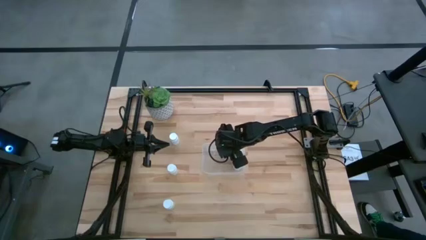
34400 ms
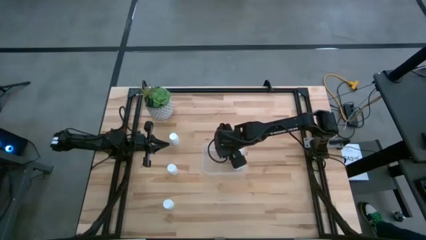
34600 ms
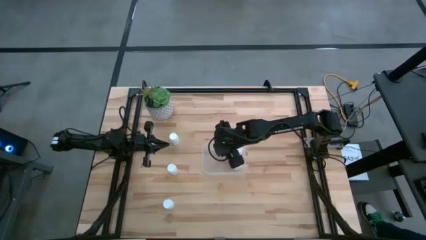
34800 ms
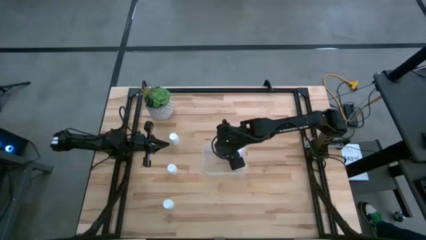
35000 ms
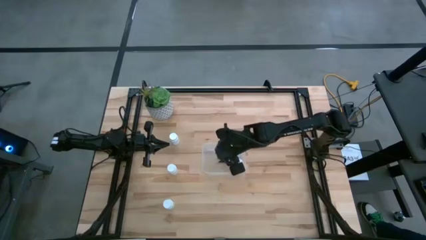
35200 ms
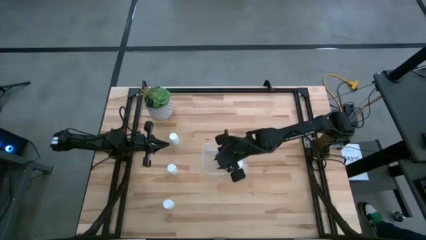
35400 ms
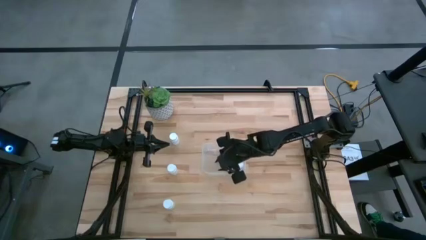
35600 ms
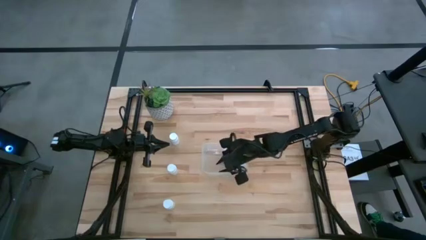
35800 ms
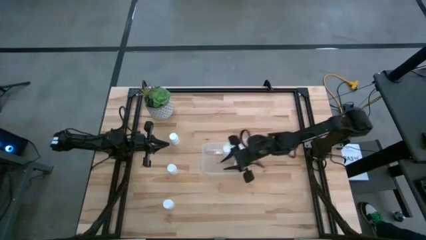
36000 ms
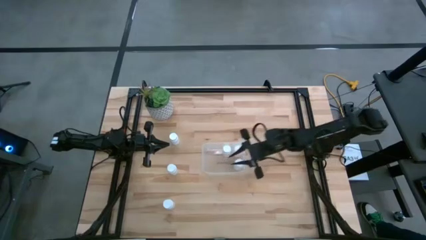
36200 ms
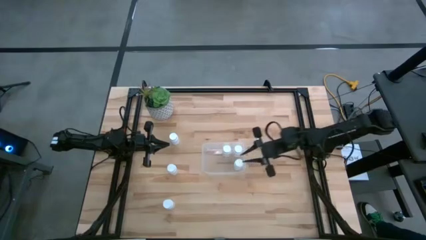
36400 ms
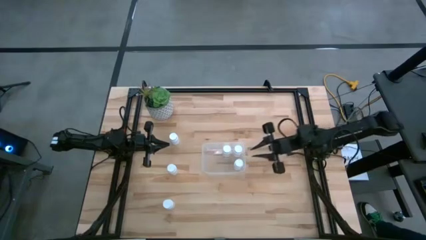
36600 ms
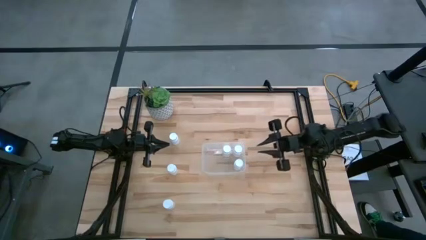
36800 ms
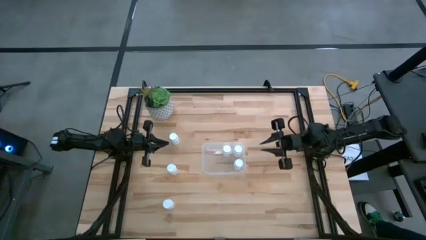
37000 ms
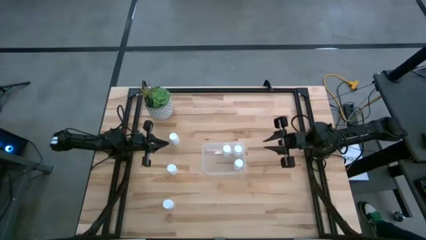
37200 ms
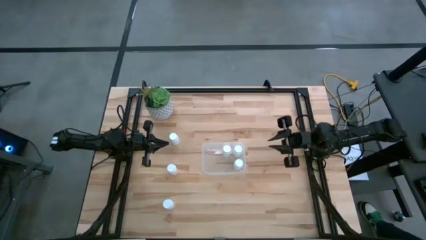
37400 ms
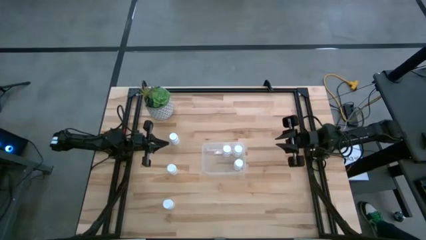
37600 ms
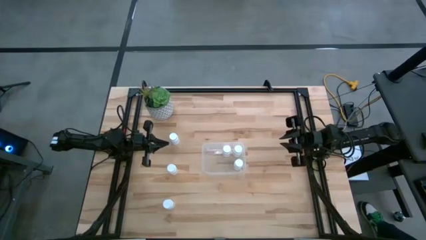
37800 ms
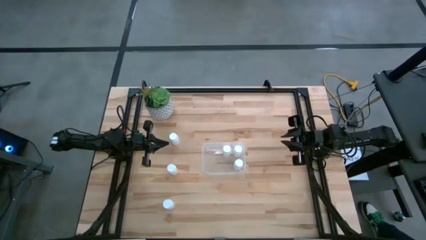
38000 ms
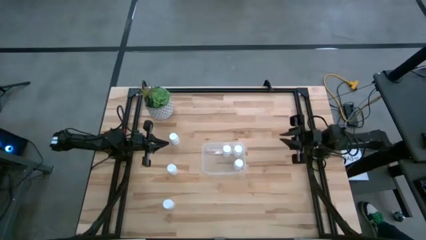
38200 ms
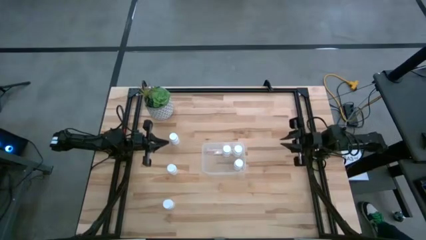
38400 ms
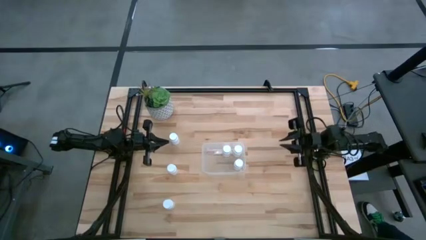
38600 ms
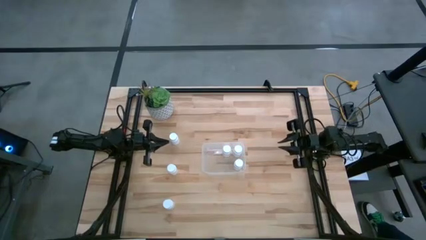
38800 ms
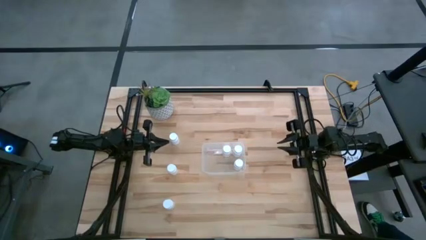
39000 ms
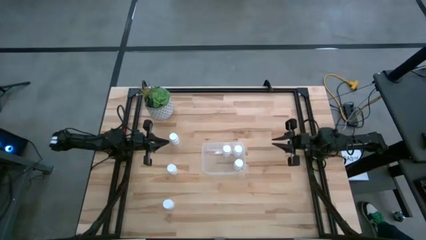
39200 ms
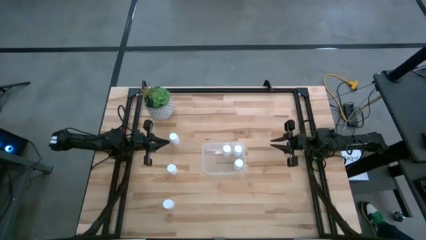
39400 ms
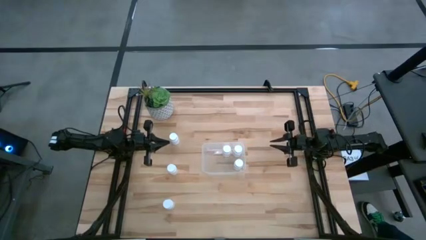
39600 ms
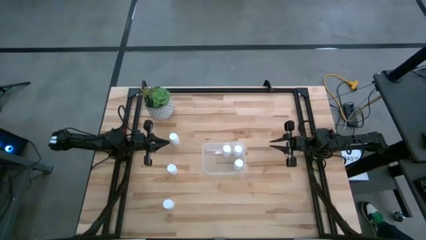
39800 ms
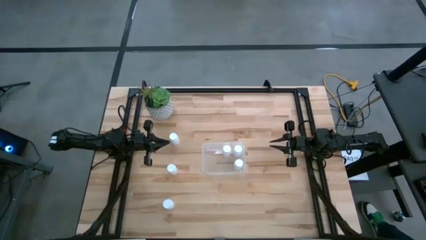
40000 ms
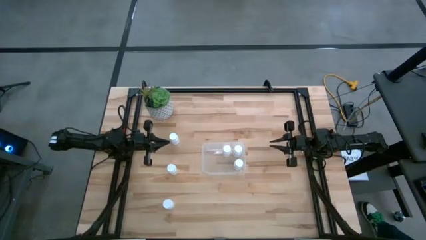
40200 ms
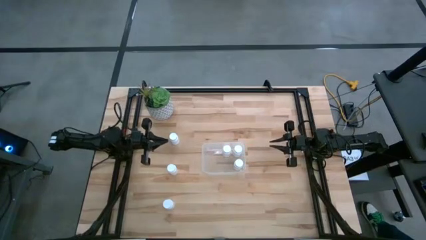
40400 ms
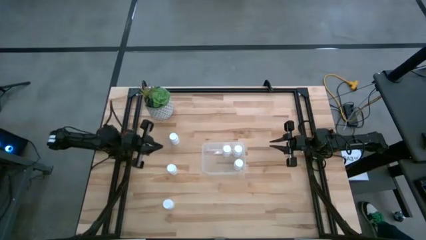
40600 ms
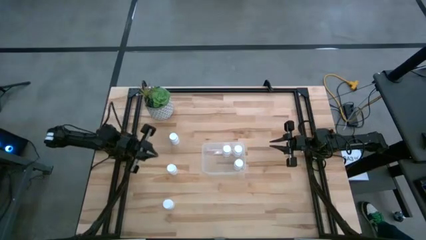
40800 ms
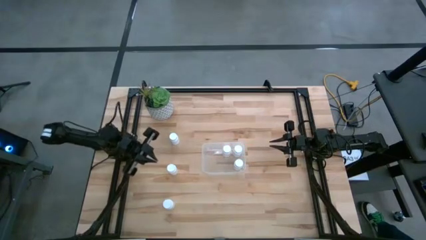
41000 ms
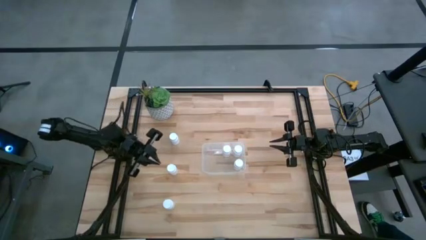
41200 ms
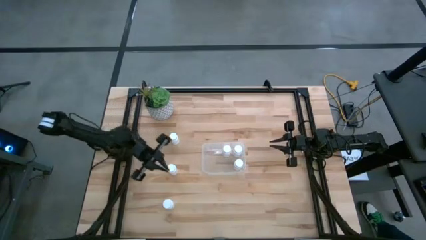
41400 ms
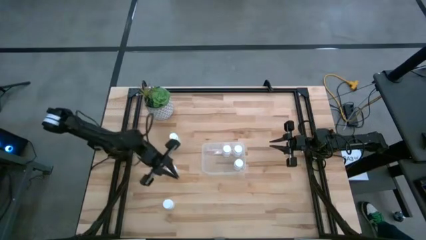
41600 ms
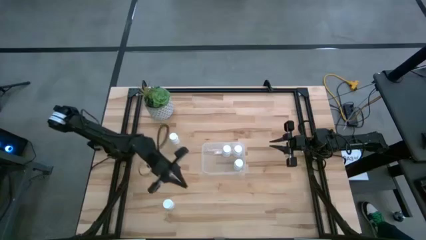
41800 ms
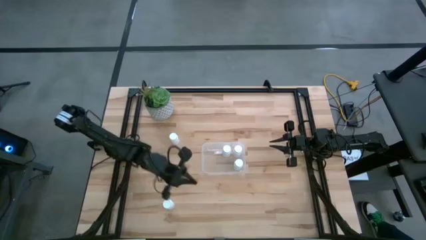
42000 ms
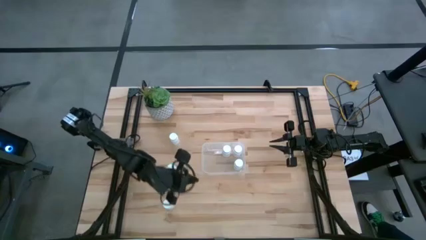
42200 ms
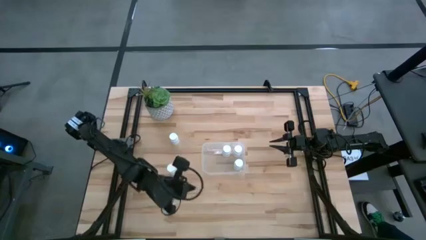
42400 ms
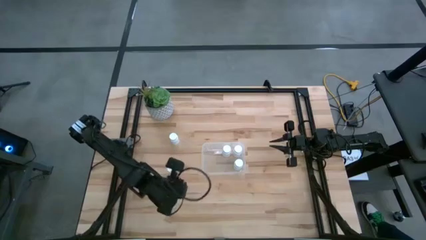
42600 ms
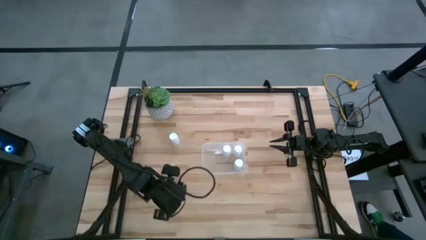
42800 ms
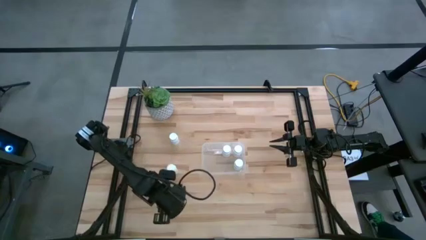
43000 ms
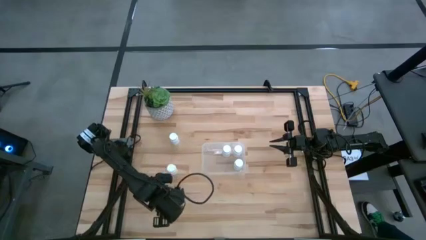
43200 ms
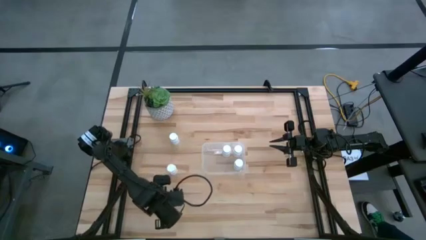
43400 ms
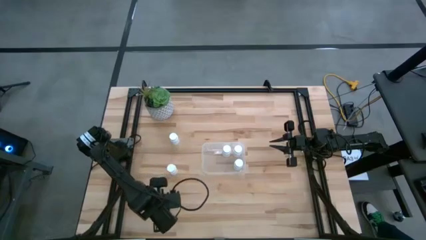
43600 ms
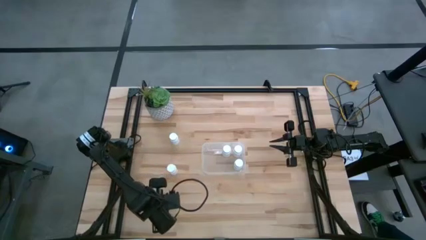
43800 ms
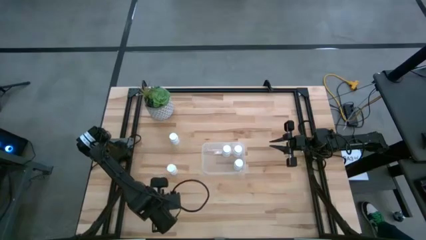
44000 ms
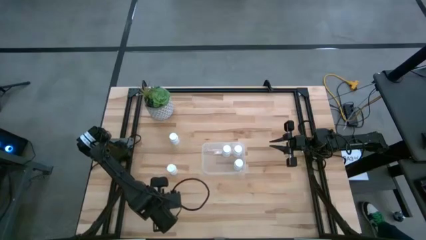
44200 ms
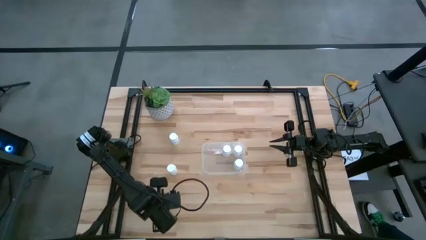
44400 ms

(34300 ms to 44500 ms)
Task: Pick and place pill bottles into a basket
Put the bottom white pill bottle into the transparent bin
